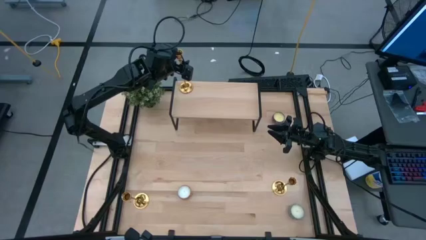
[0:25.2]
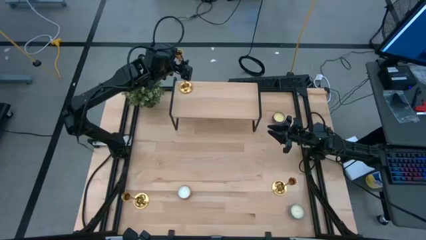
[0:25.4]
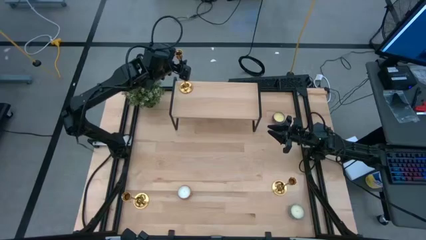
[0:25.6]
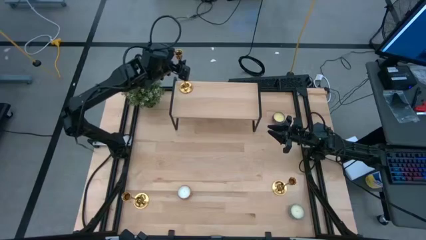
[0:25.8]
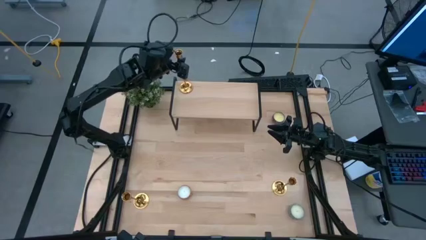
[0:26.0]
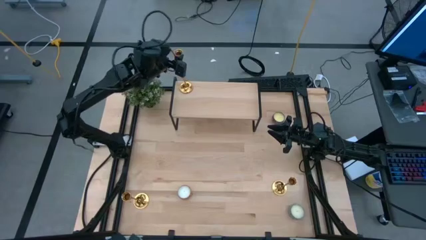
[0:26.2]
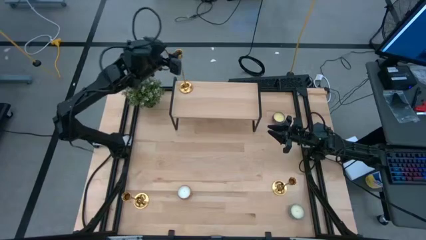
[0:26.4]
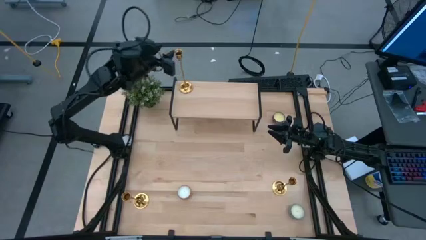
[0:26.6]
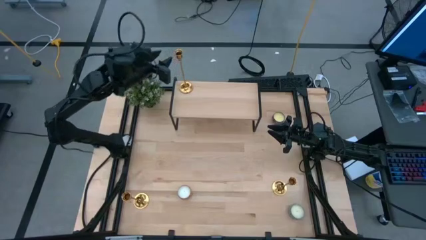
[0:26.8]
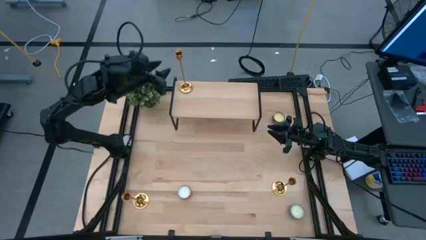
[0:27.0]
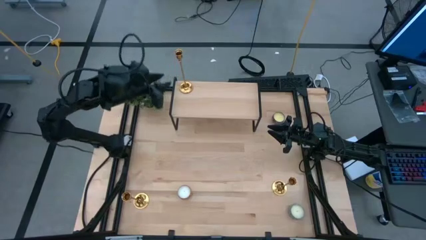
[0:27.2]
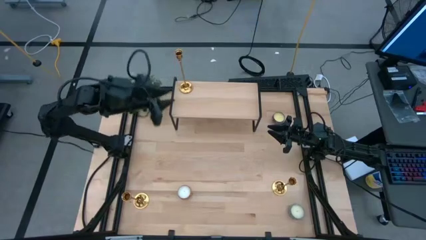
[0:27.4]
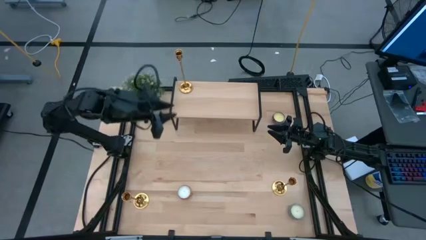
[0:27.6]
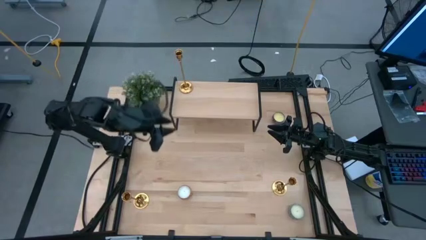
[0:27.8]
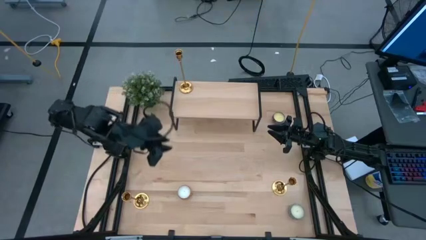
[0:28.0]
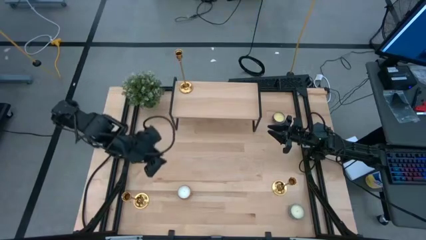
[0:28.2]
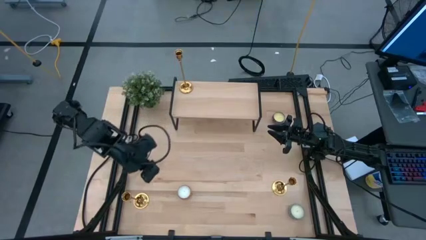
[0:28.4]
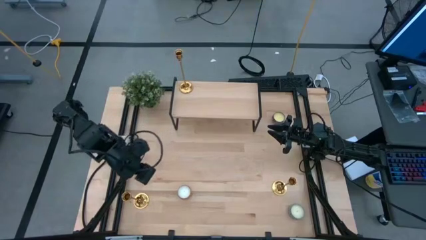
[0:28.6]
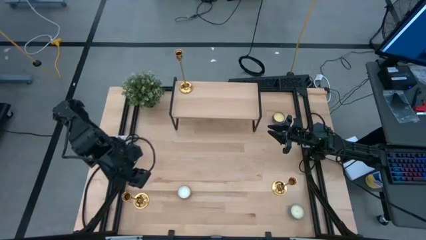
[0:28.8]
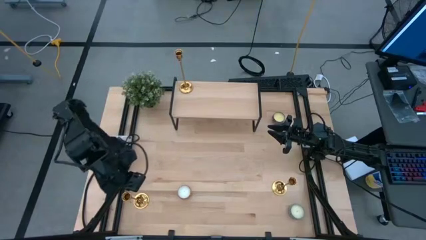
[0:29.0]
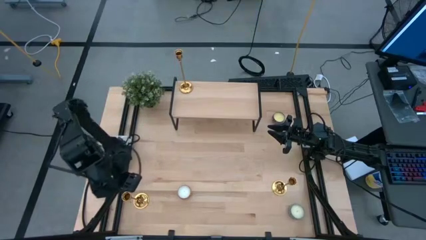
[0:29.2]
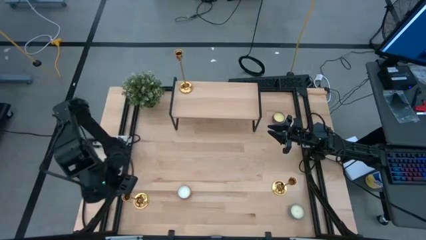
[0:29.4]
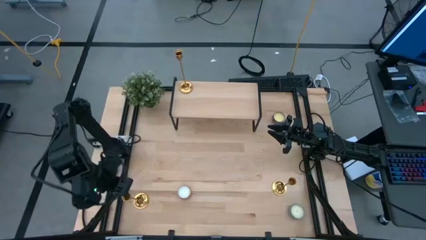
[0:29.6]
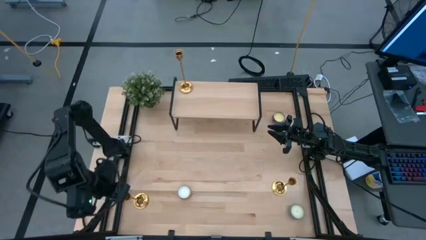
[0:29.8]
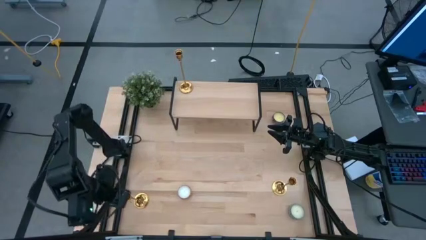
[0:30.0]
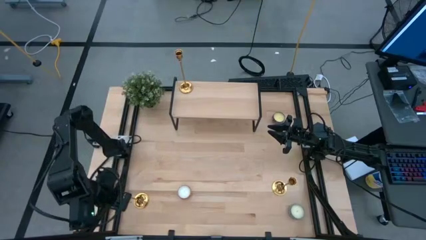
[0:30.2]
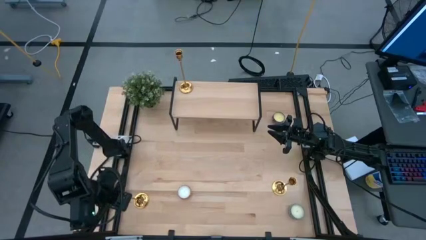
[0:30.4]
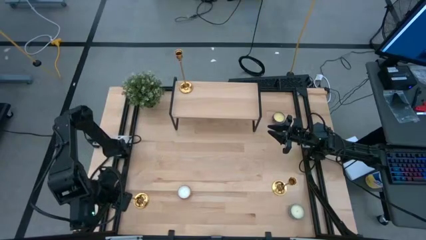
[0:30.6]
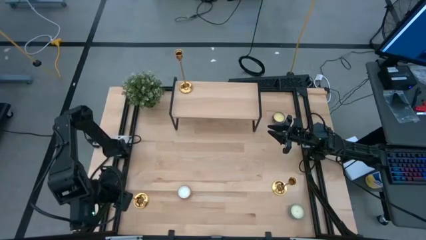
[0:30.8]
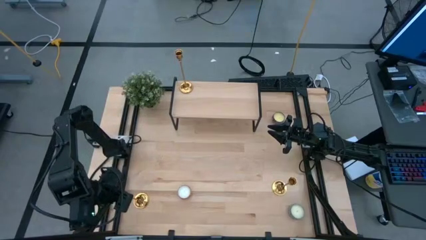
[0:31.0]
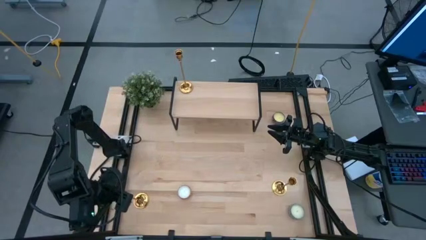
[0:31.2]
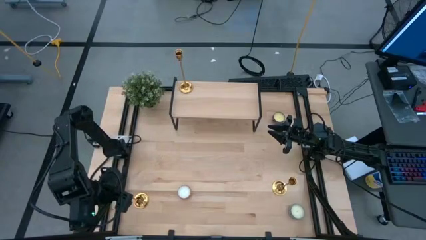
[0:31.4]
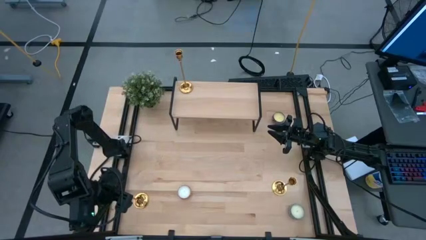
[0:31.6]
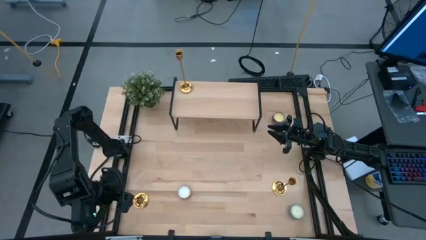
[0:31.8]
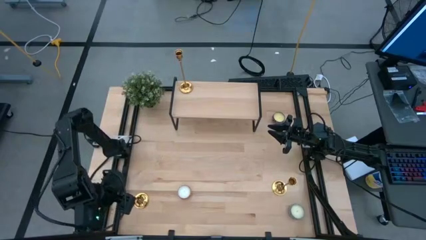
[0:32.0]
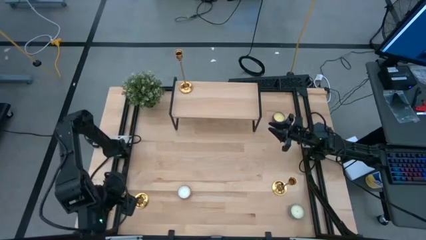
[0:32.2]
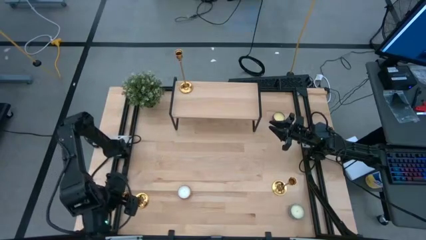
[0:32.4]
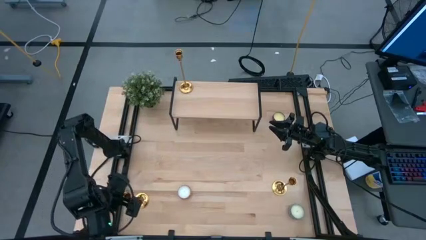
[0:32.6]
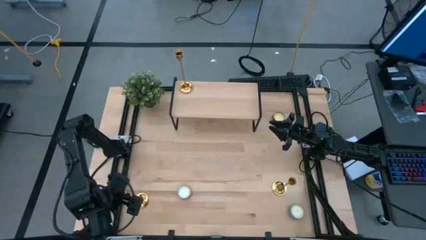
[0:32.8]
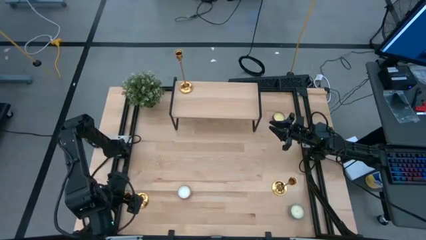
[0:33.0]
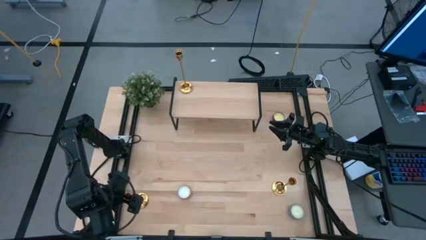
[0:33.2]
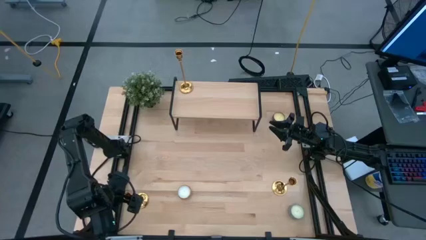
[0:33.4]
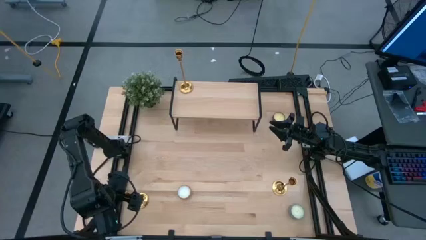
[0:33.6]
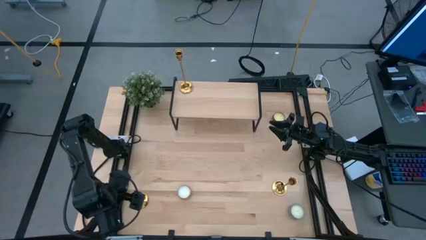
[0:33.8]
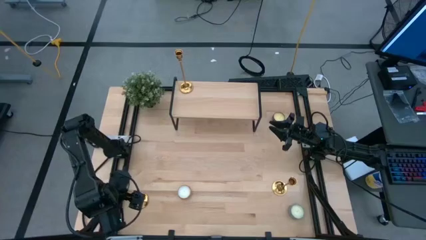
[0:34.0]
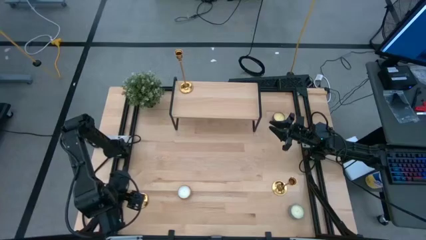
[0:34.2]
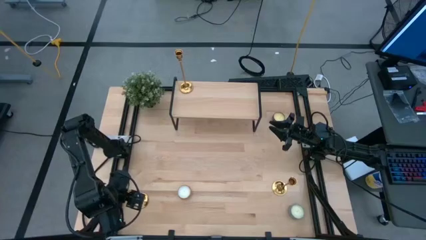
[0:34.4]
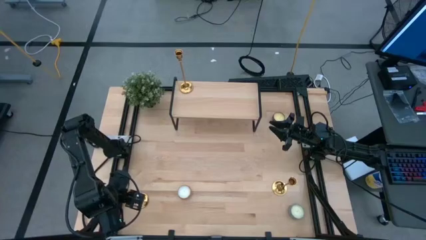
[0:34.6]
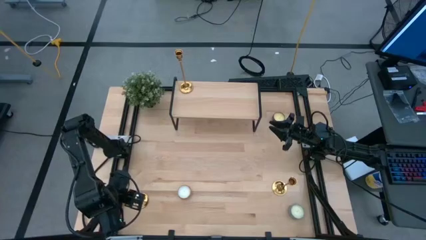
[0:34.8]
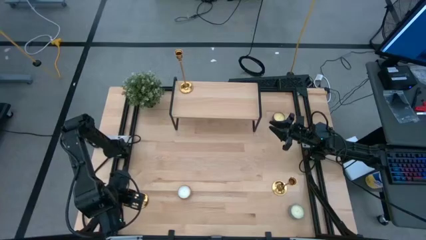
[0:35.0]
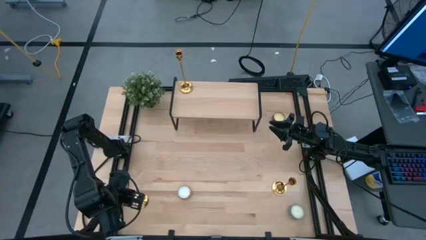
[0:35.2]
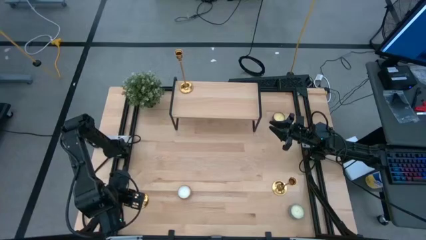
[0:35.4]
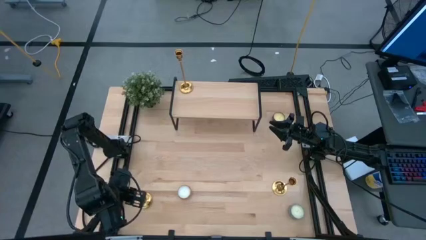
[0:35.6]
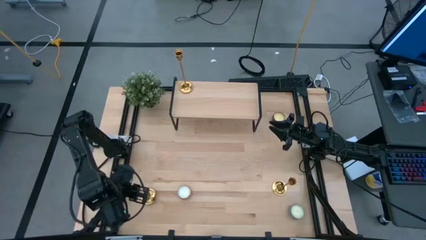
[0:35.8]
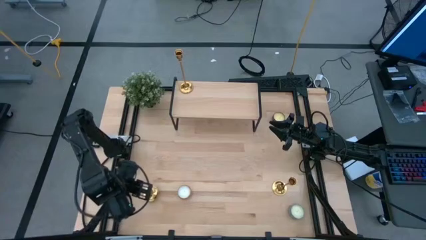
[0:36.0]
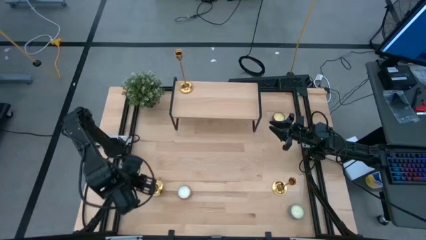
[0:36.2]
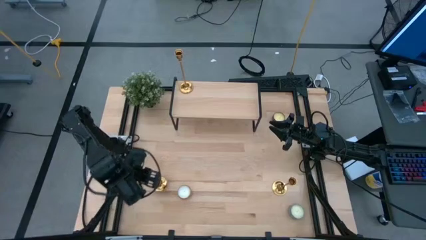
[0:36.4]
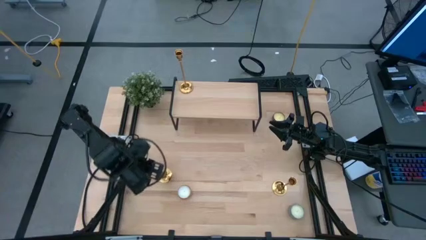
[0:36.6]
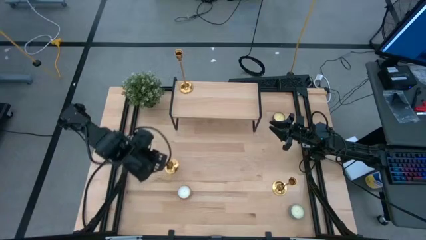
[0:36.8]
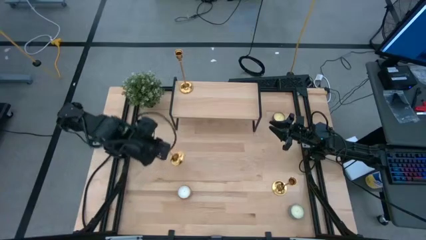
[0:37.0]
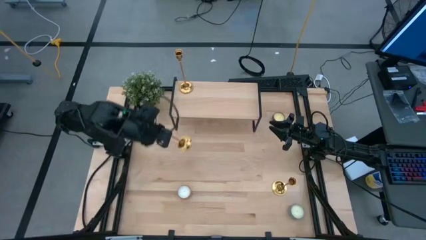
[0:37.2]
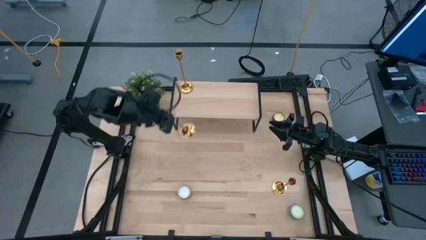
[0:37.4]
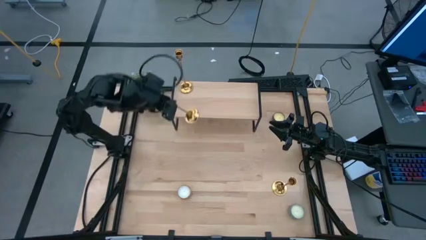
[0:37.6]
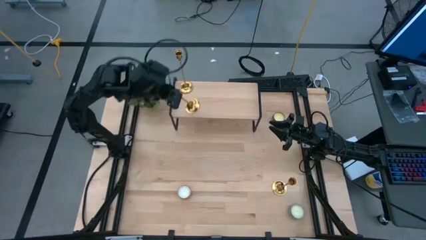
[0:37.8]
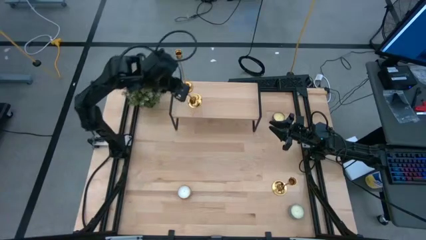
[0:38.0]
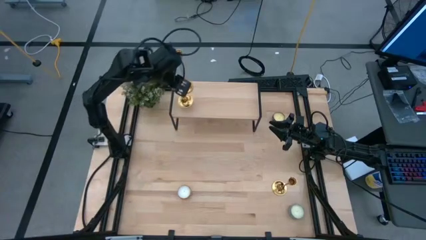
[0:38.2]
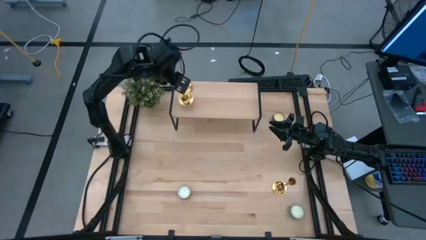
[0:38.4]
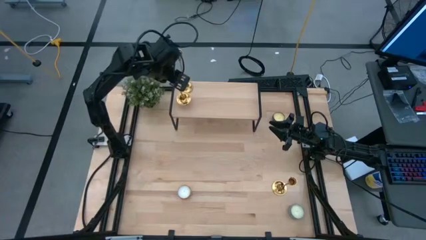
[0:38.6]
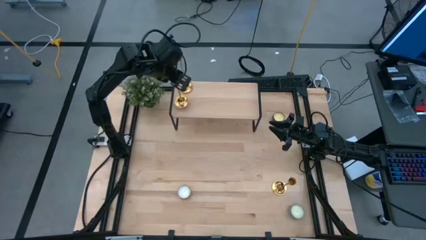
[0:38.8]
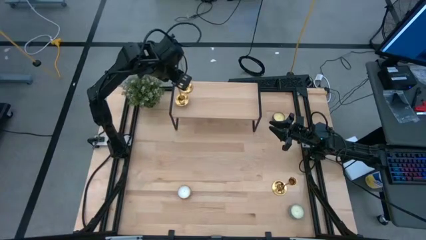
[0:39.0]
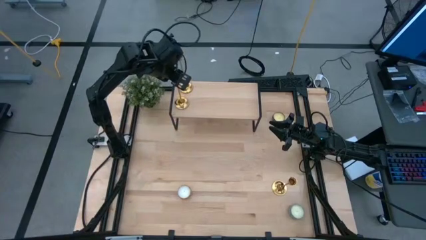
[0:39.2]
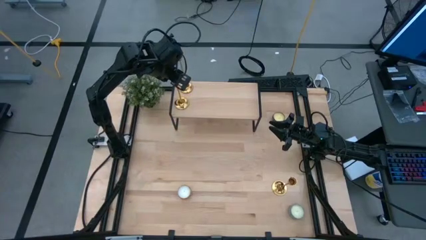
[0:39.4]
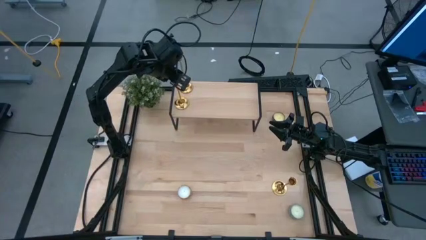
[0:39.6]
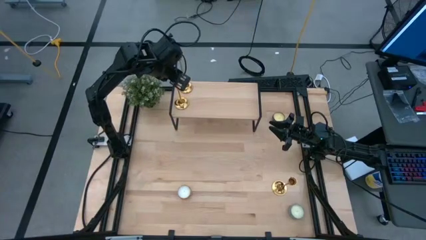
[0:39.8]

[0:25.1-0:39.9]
Task: Pick & Place candle stick holders
Put the left gold candle holder on the shelf

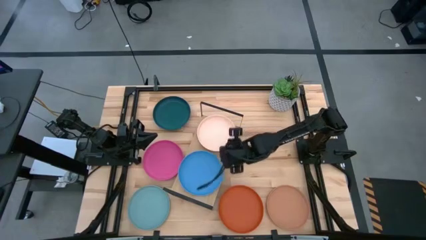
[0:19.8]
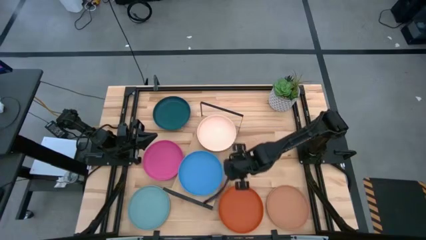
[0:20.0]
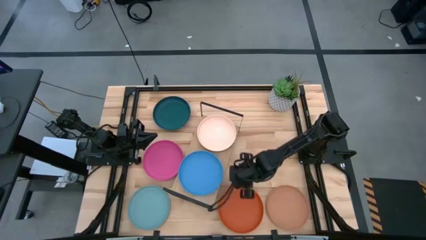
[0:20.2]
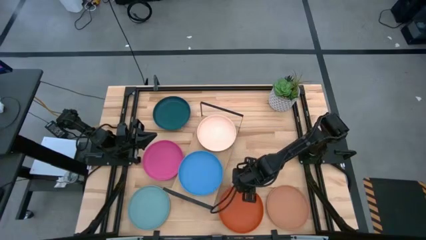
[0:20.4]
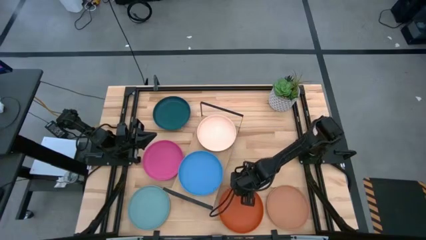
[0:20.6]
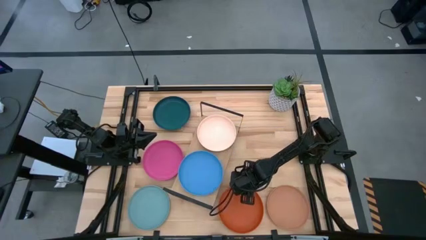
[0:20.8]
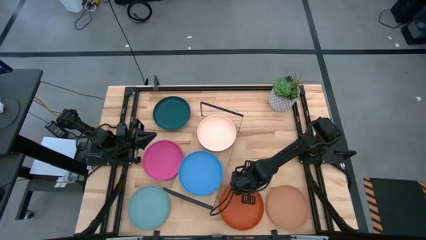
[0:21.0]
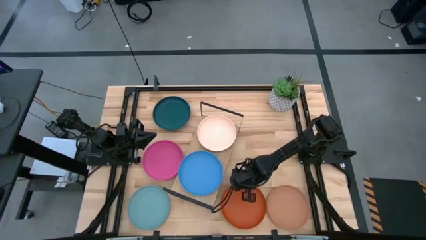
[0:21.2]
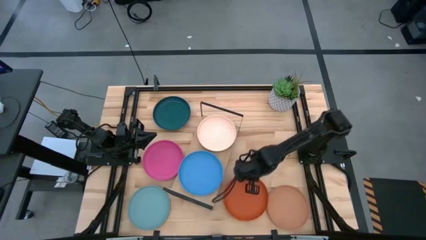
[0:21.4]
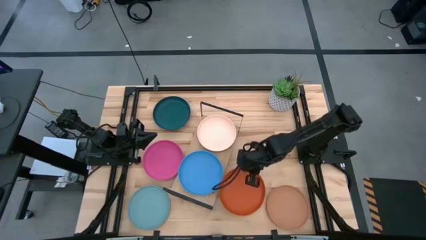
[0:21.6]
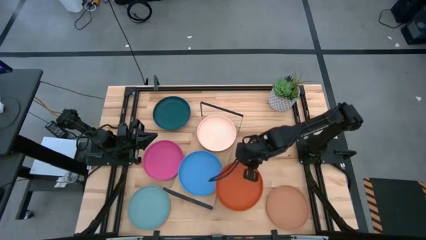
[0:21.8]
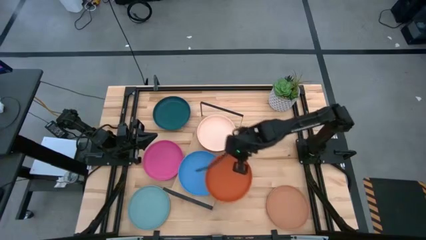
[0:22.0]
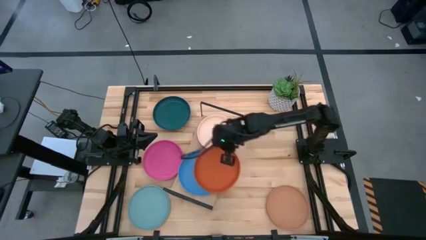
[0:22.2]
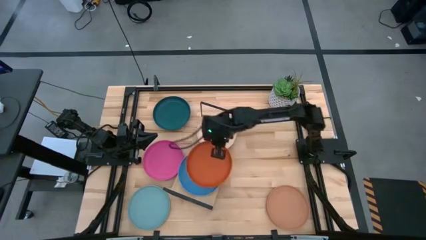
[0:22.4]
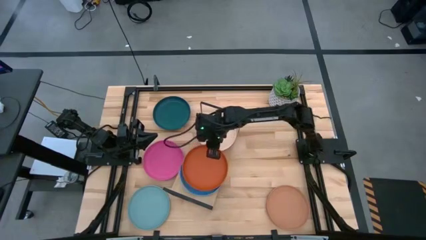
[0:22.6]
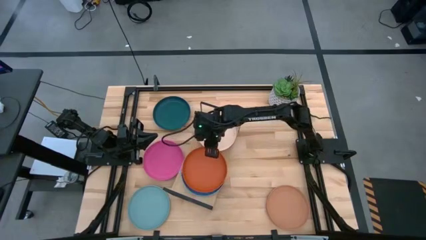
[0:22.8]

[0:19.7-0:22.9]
Task: Place and stack plates onto a shelf
Stack the orange plate on top of the blue plate on the shelf
